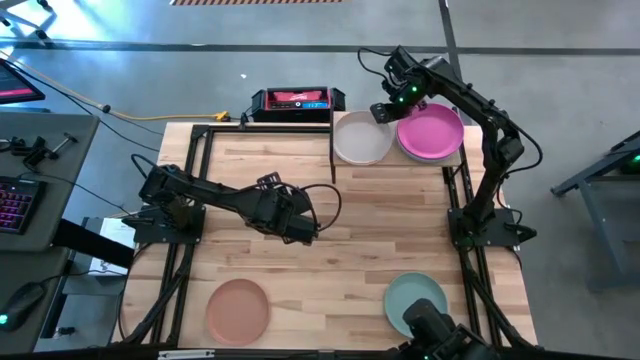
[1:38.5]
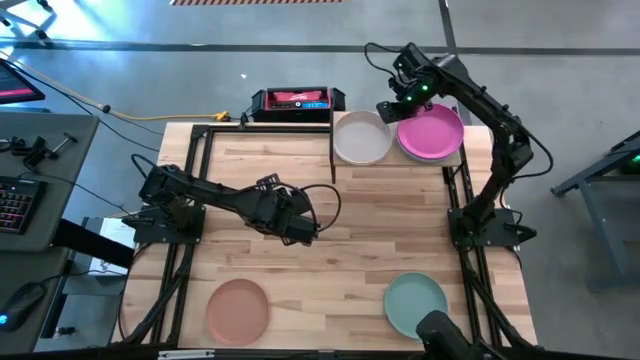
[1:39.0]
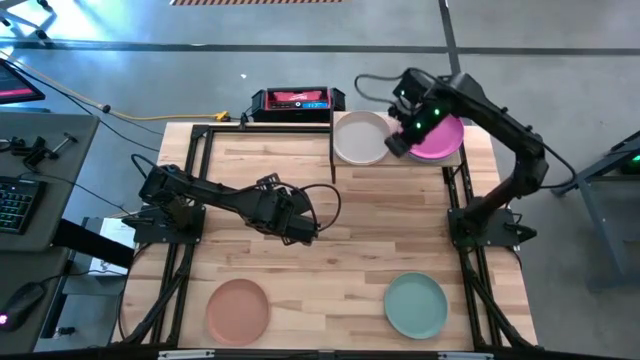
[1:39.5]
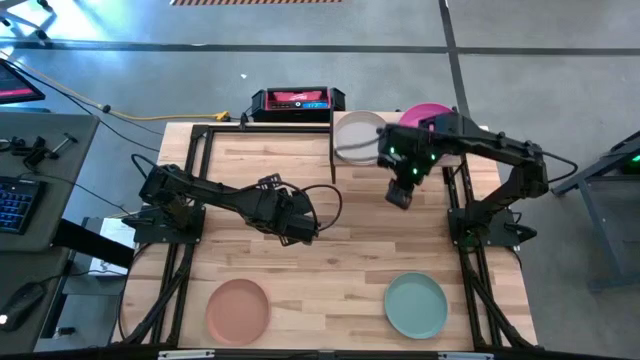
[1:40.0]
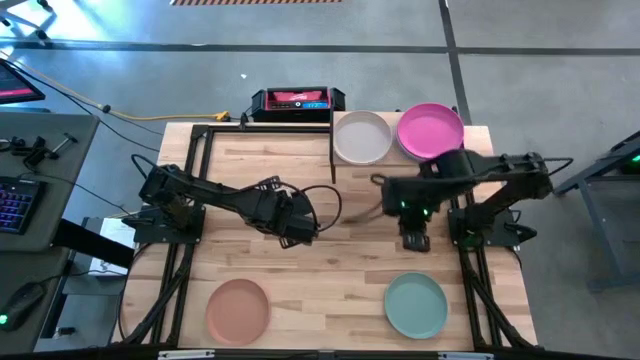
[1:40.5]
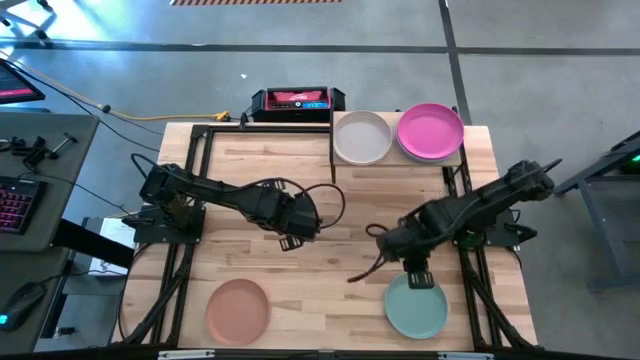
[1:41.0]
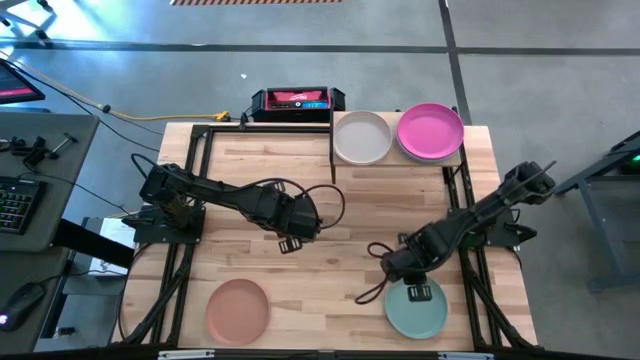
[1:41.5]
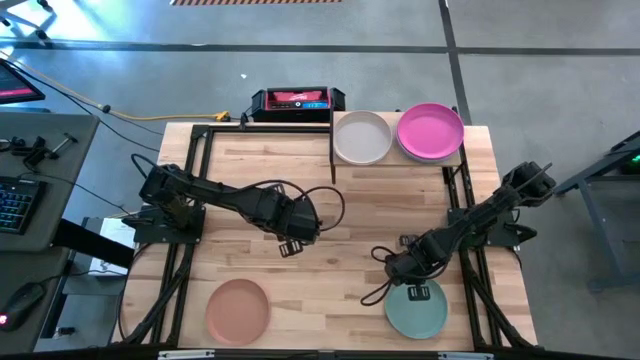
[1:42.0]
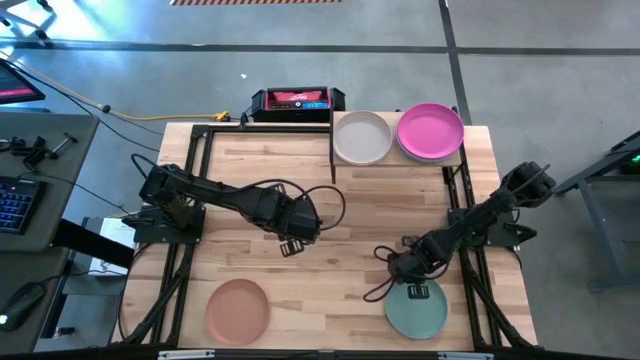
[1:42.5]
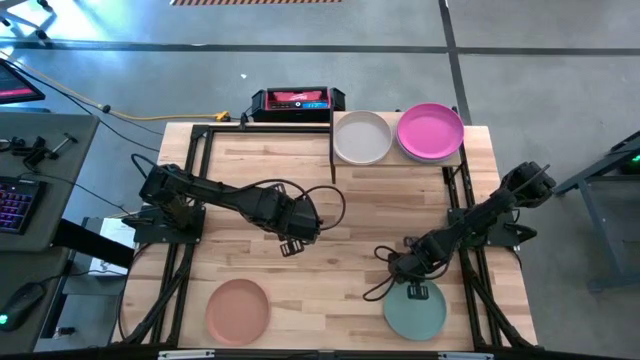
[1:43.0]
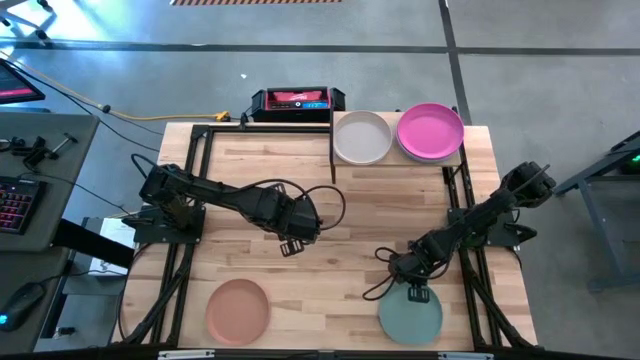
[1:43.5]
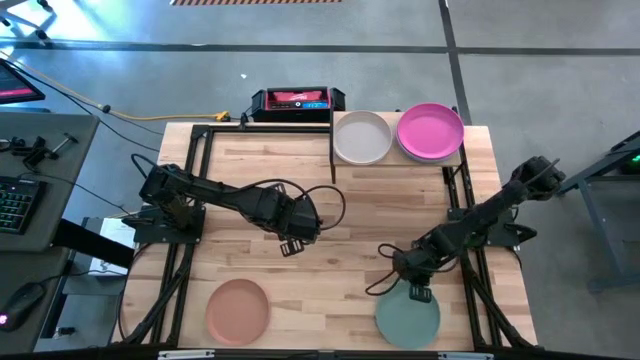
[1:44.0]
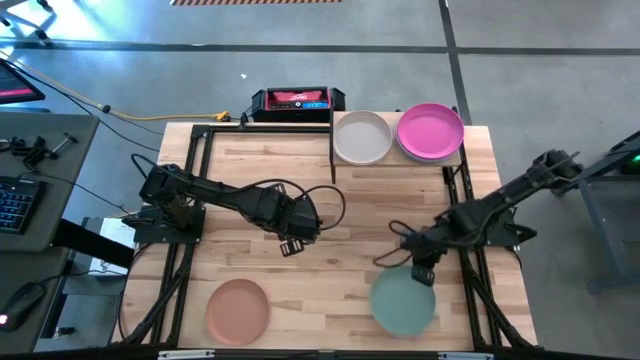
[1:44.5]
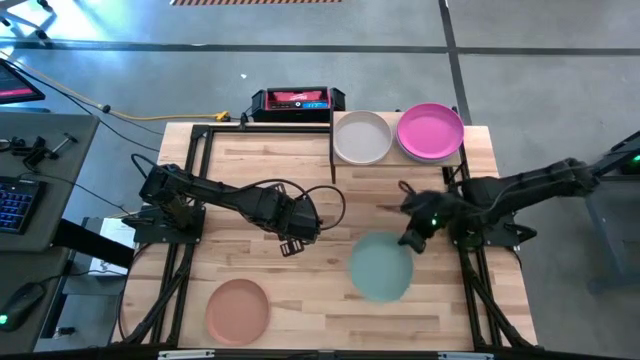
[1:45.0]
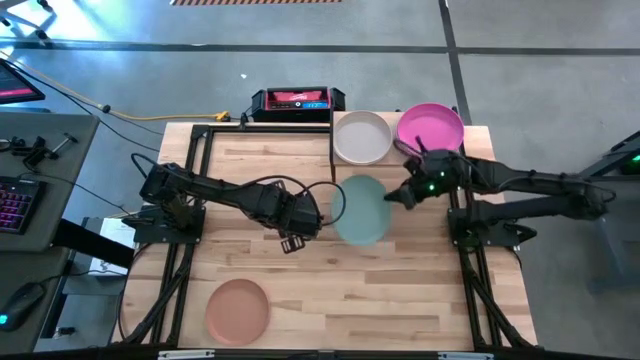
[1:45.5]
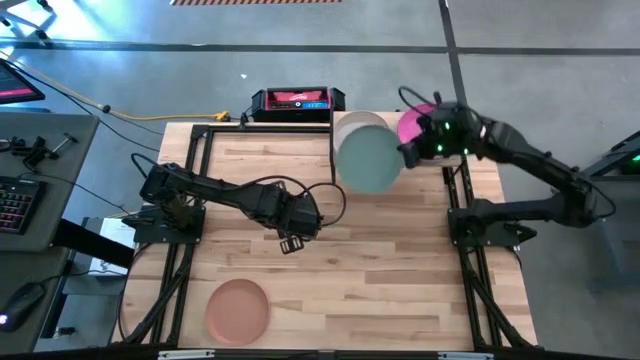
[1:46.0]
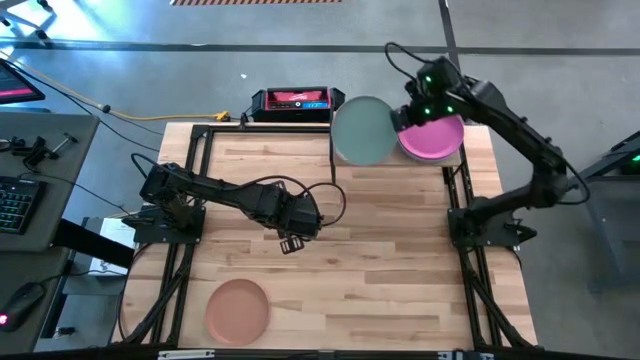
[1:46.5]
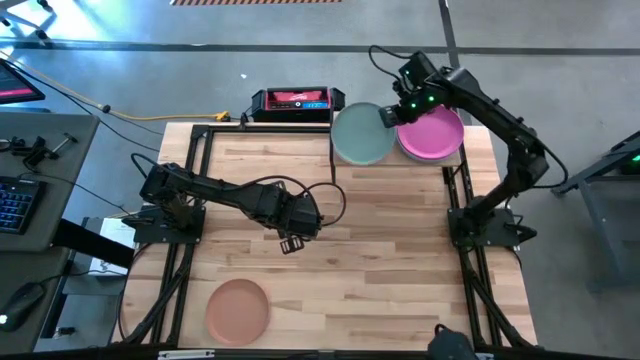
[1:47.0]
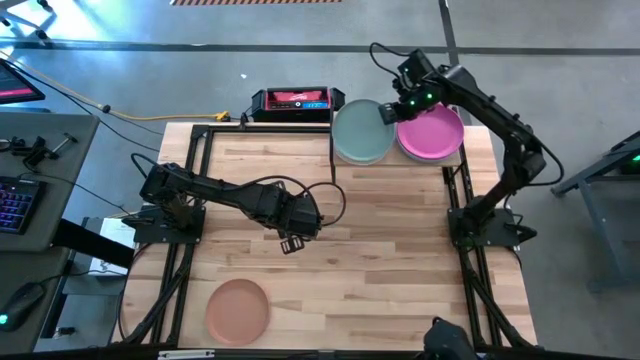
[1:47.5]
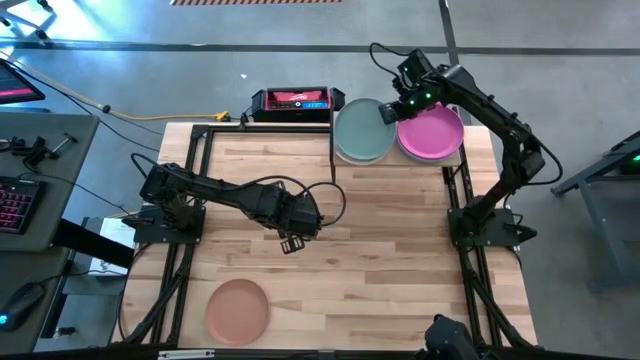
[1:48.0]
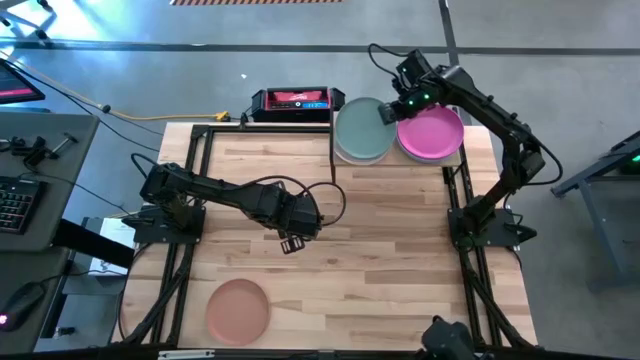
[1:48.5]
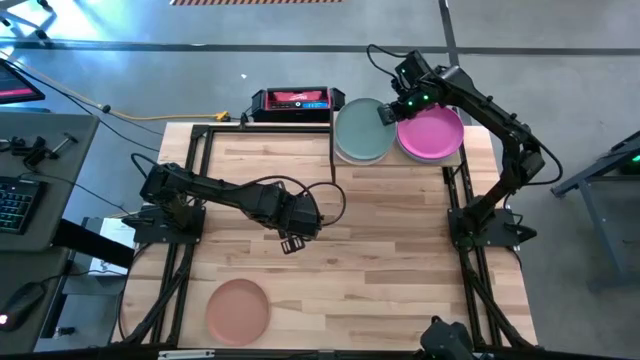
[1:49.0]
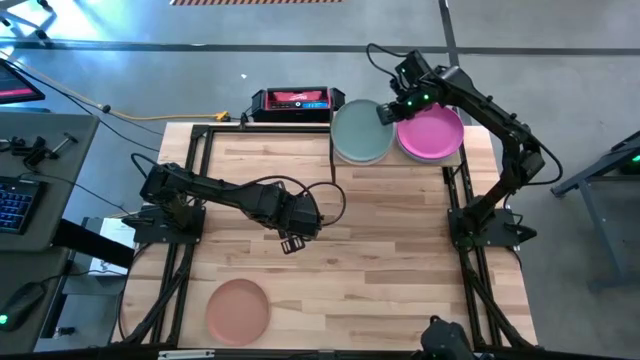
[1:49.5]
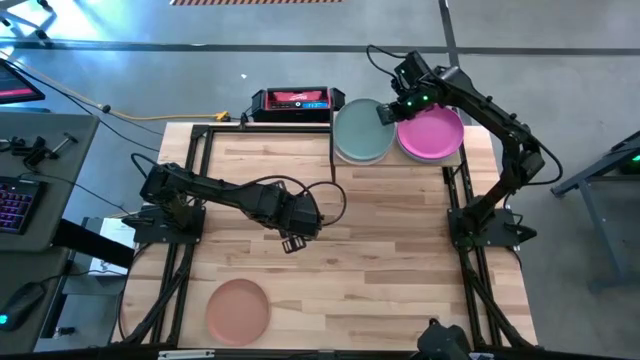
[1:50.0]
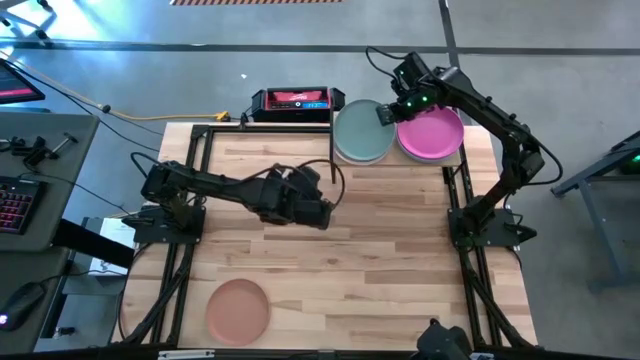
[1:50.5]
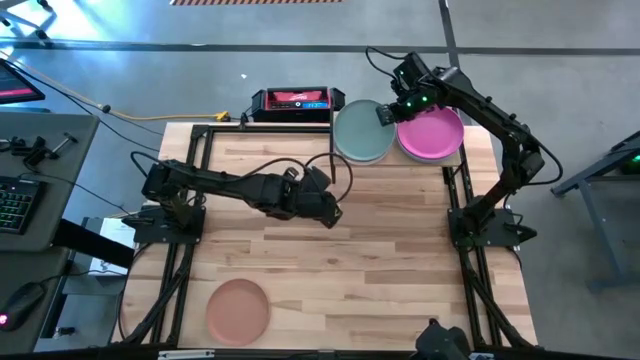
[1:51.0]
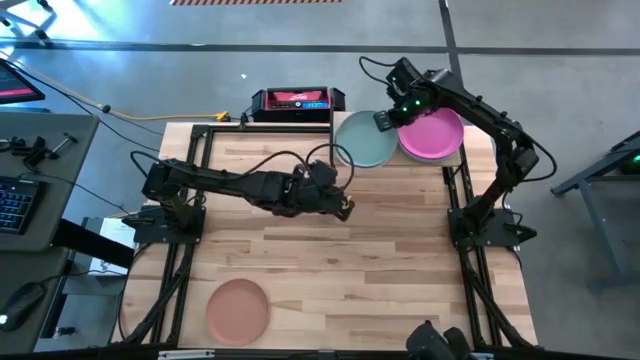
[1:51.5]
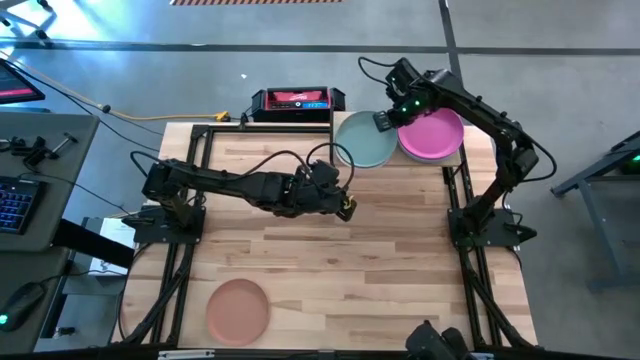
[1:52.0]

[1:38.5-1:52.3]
Task: Place and stack plates onto a shelf
Stack the green plate on top of the gray plate on the shelf

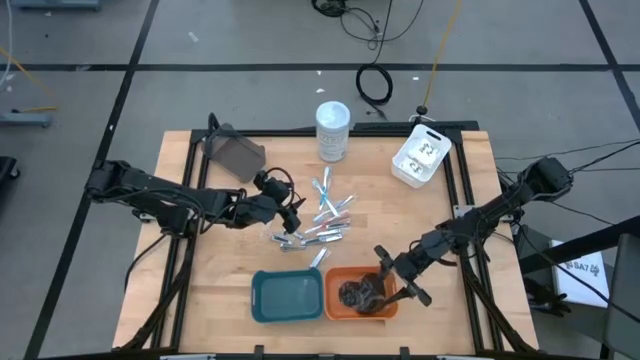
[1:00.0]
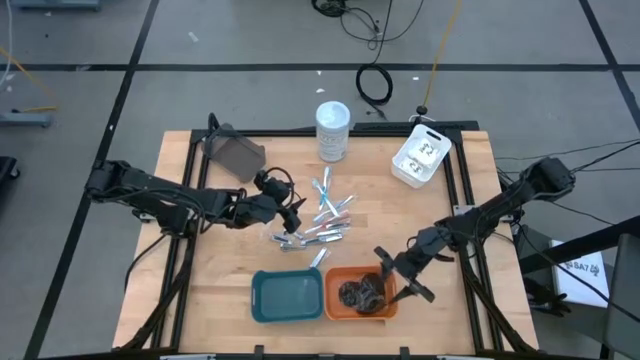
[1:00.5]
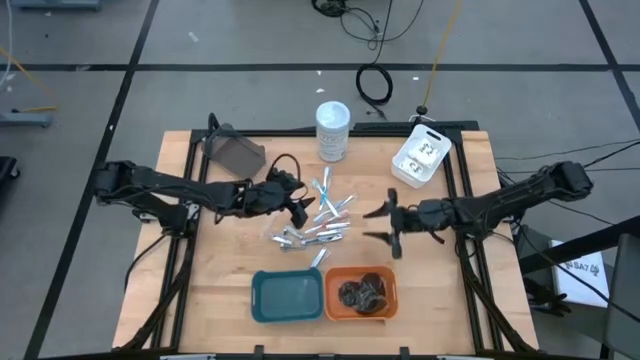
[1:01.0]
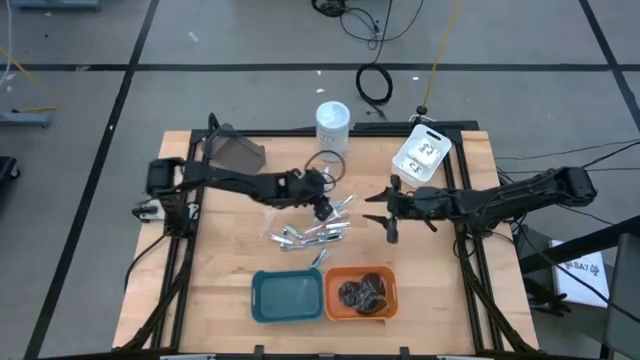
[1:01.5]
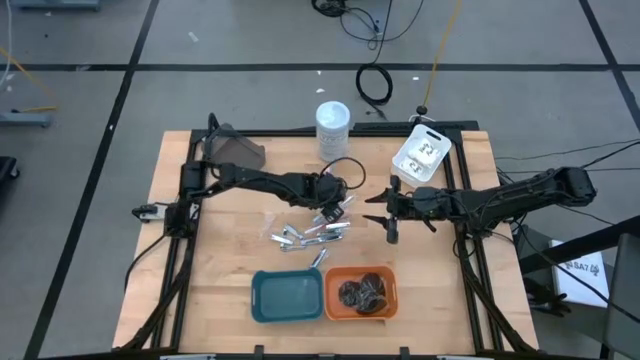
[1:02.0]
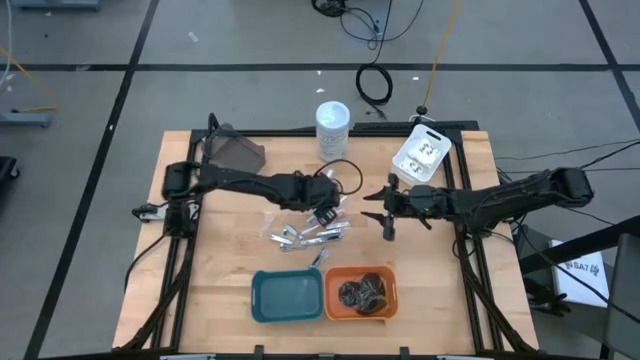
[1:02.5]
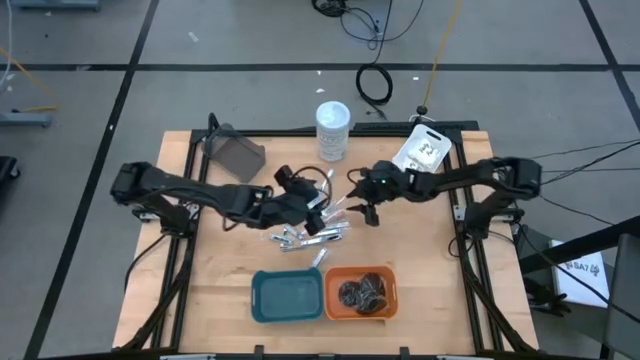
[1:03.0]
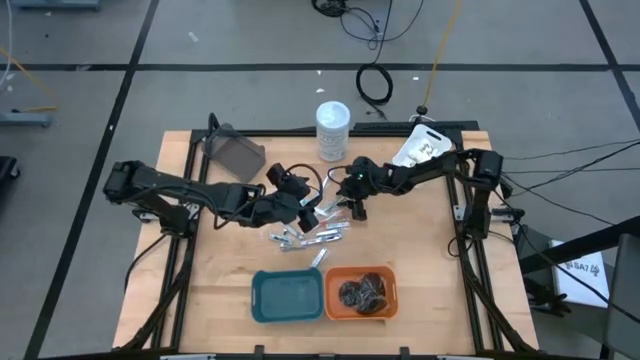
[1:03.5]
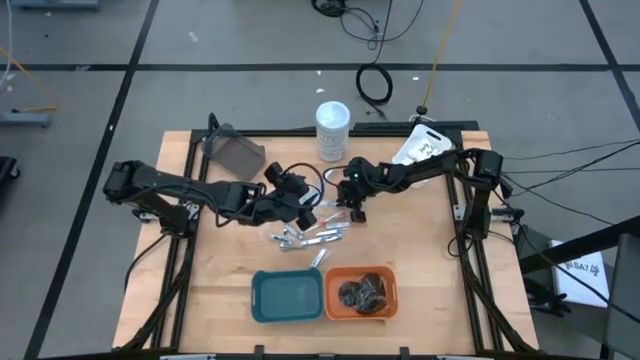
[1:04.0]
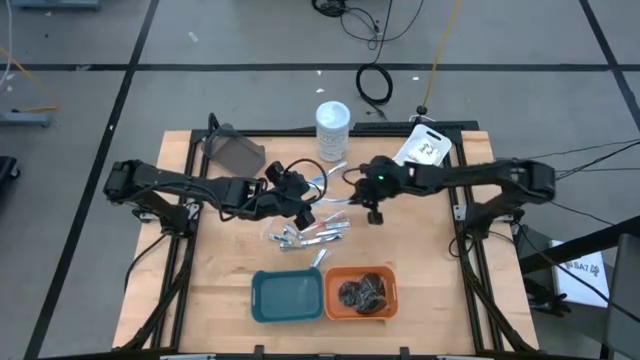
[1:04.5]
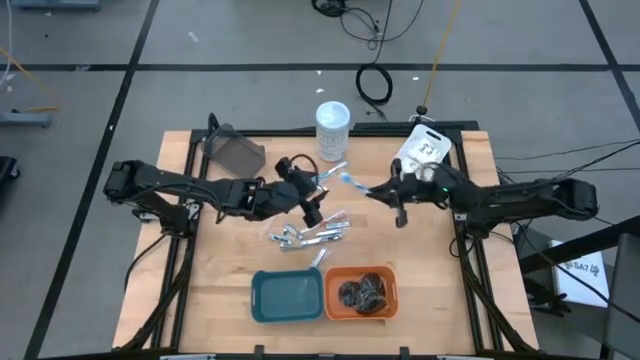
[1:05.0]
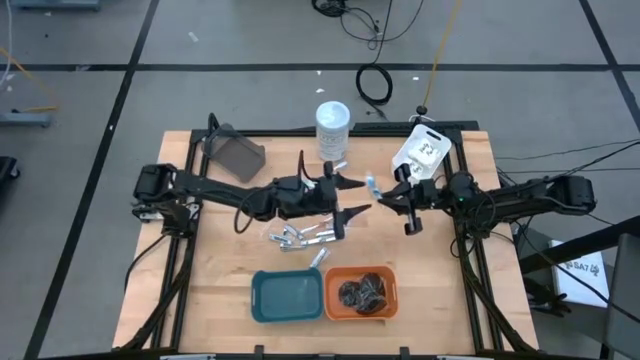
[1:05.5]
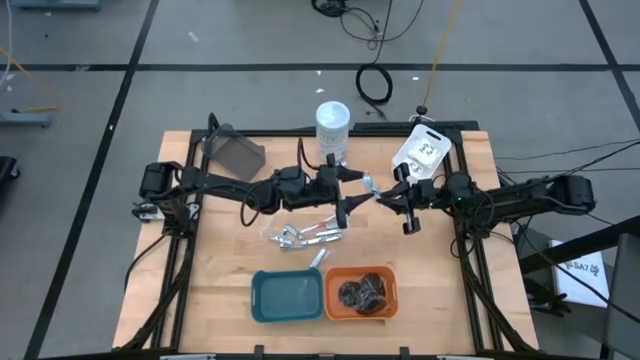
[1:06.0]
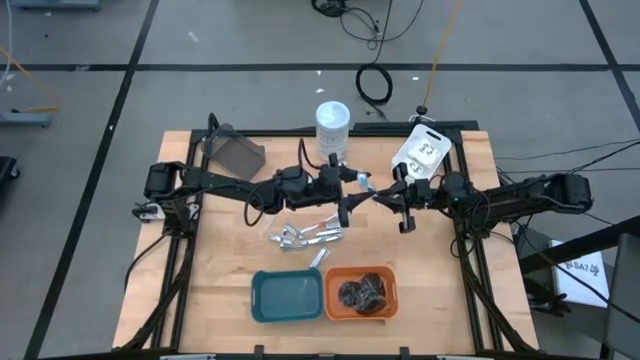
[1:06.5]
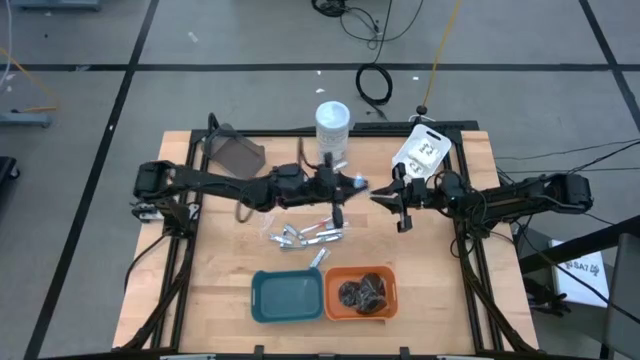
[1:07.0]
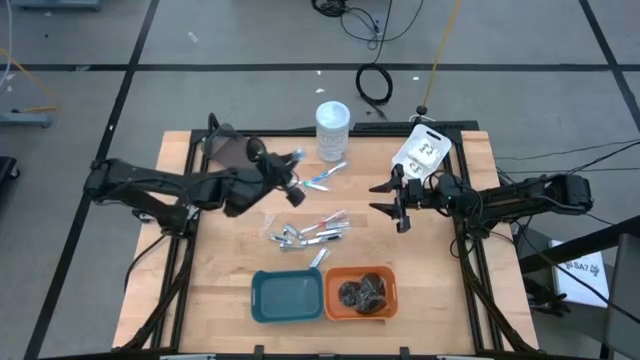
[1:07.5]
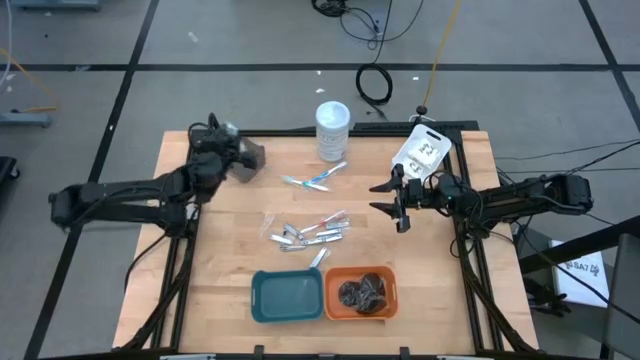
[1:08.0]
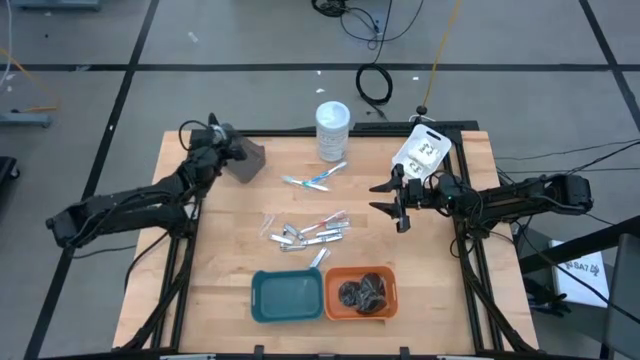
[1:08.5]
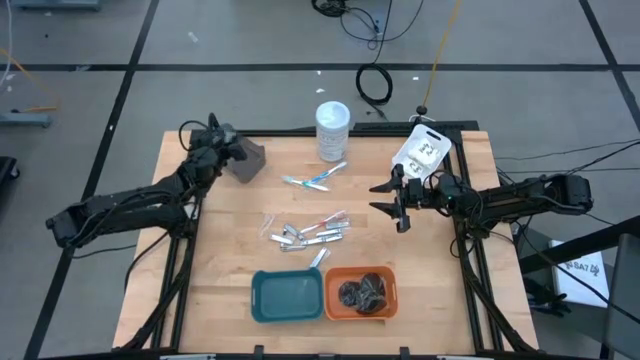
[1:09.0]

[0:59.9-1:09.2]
Task: Pick & Place Travel size toiletries
Put the blue toothbrush into the black bin
